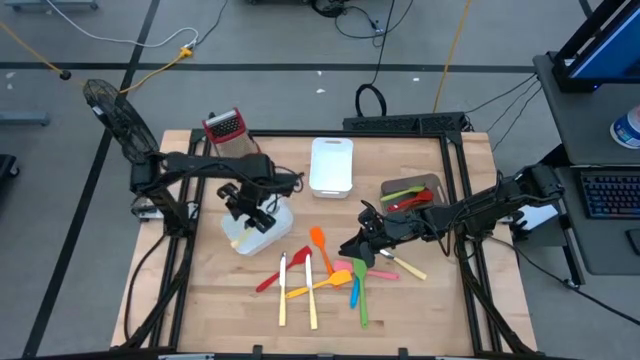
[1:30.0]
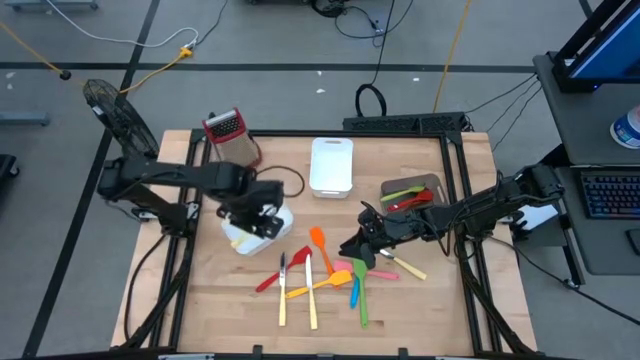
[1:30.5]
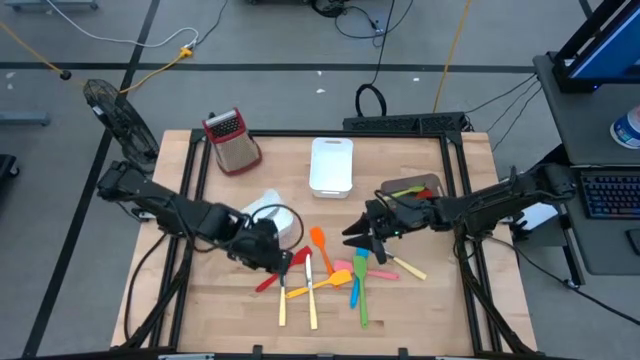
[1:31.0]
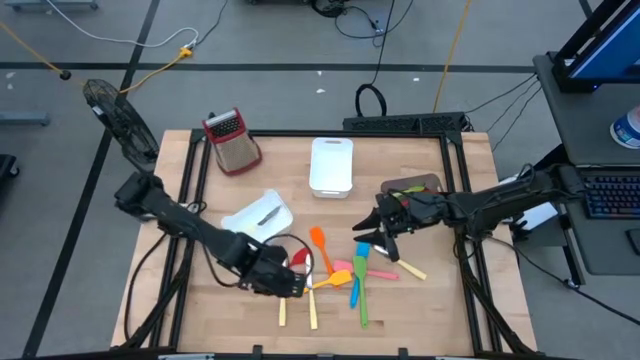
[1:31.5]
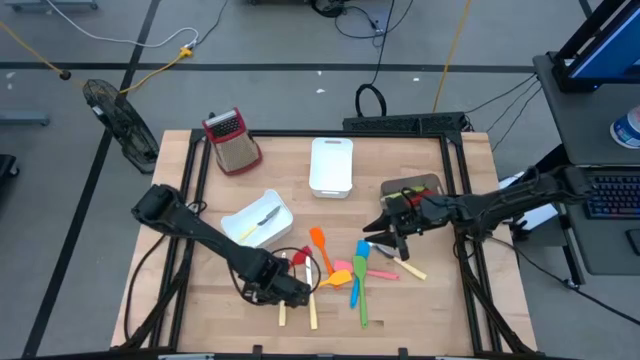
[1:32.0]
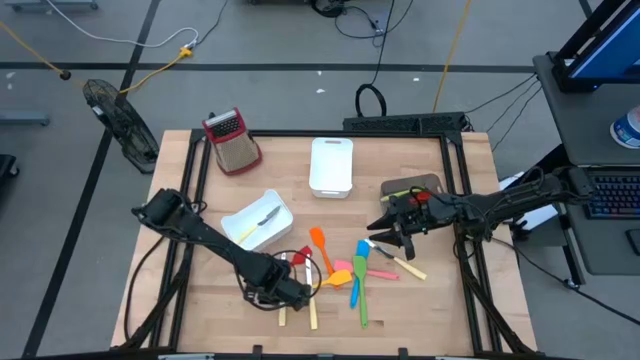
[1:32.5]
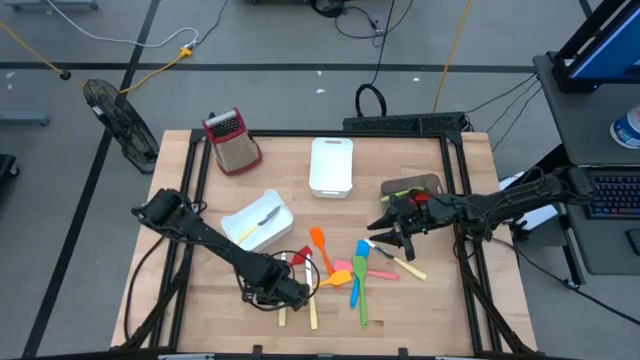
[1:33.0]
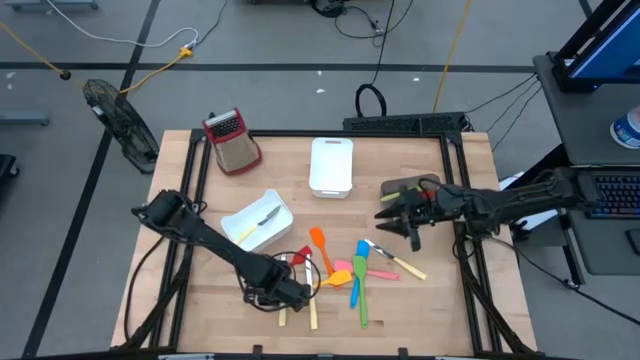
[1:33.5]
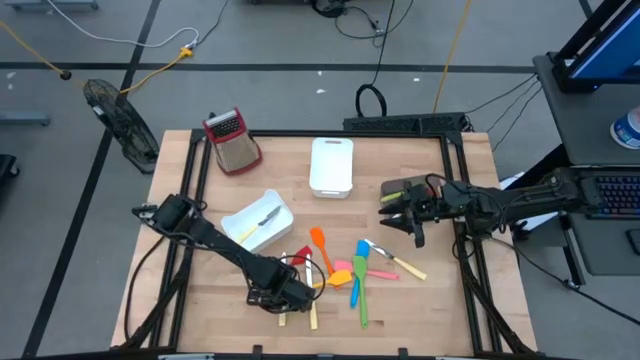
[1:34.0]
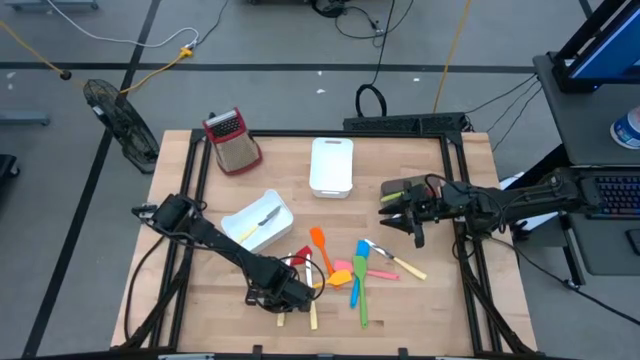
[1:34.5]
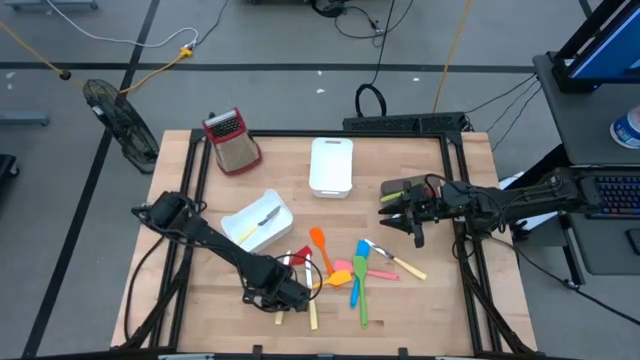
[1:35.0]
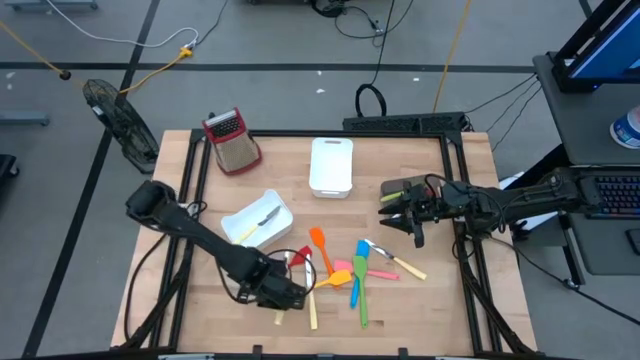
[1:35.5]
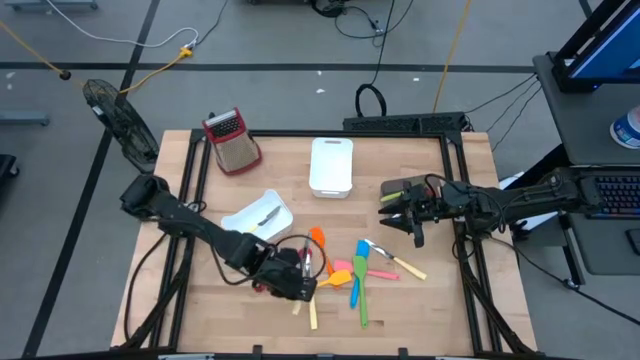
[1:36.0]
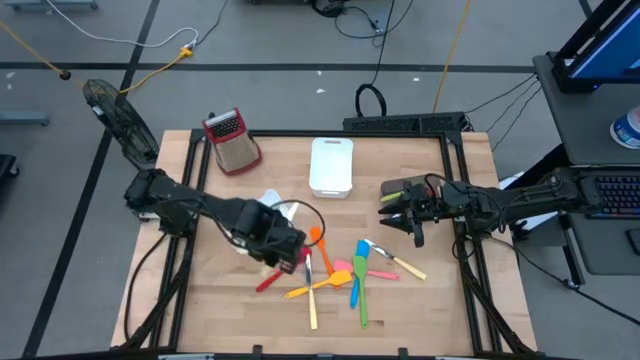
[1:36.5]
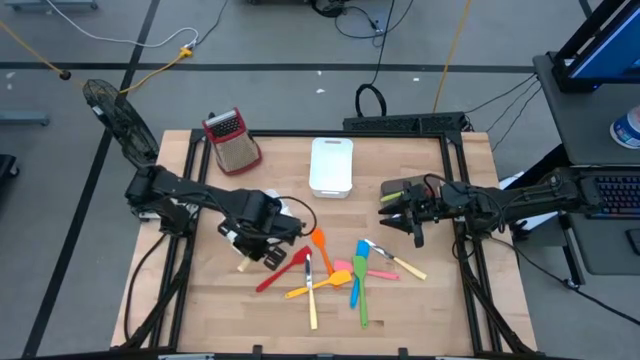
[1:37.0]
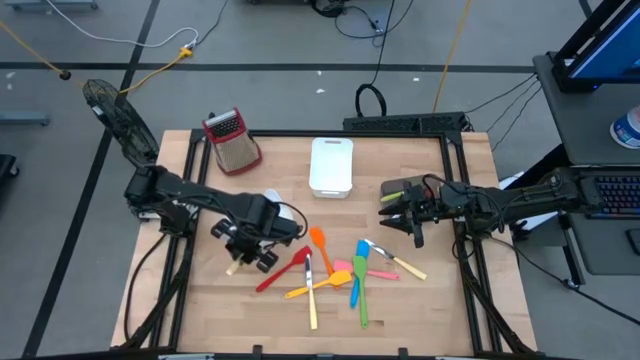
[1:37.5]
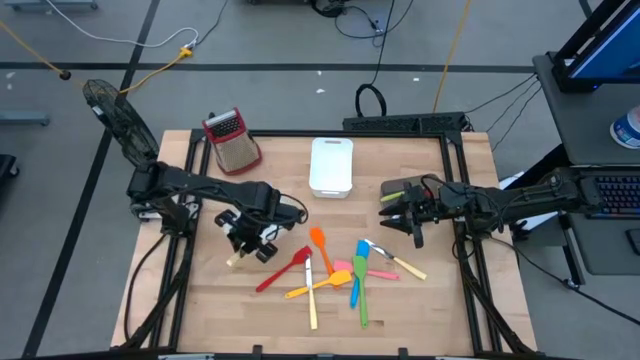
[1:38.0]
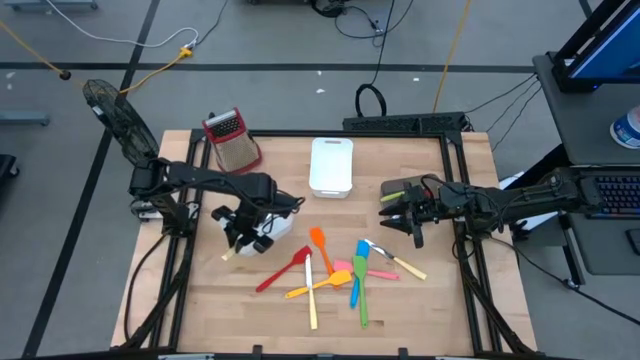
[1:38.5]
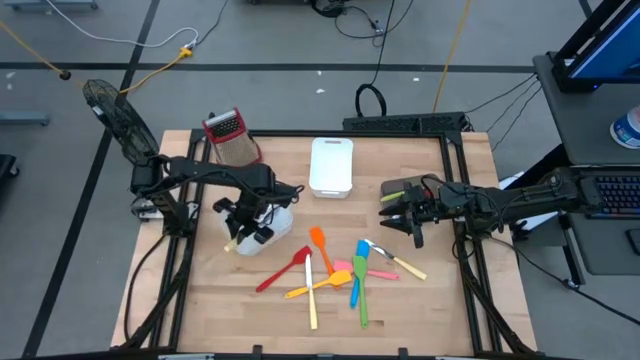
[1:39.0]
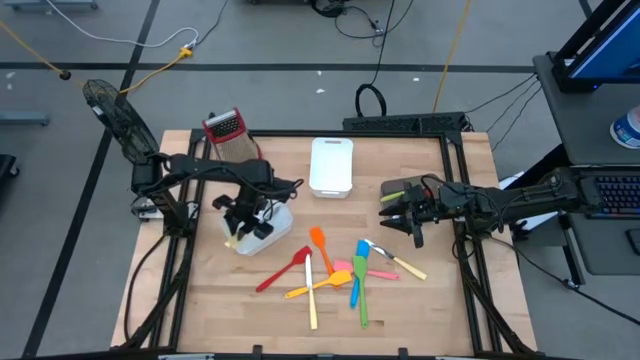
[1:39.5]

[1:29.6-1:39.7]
Task: Pick & Place Kitchen Items
Put the white table knife into the bottom white bin

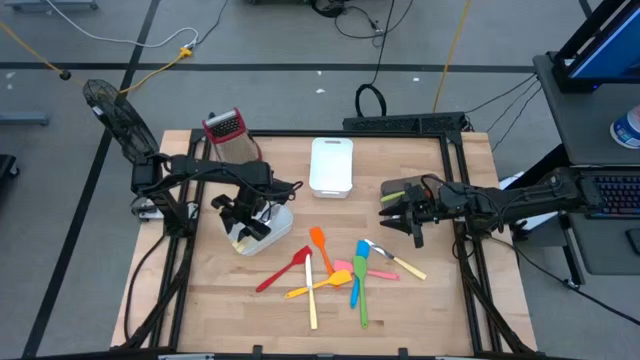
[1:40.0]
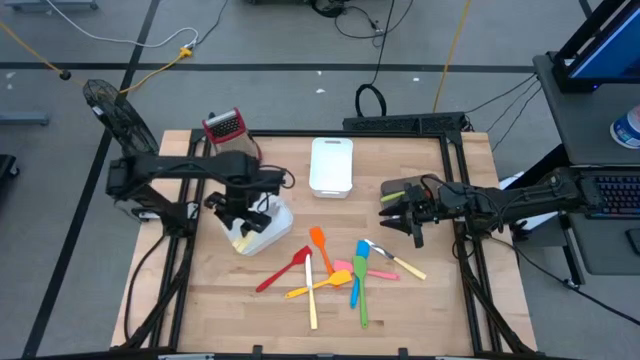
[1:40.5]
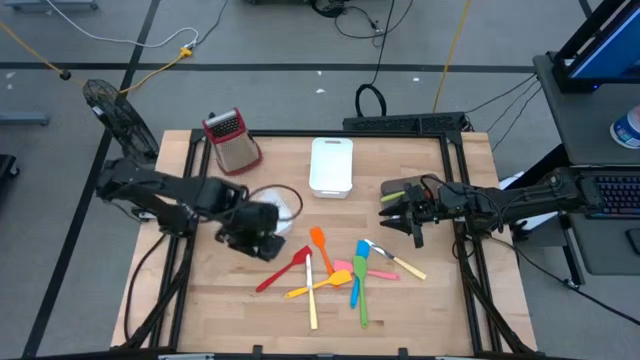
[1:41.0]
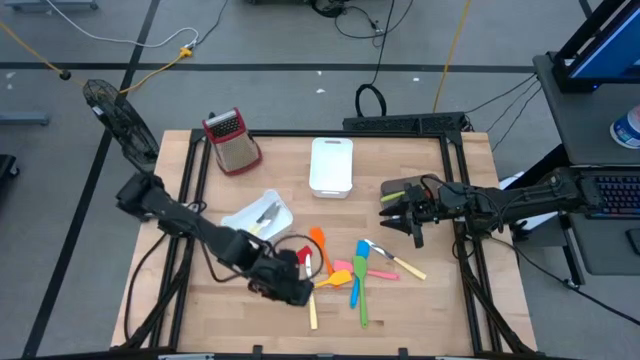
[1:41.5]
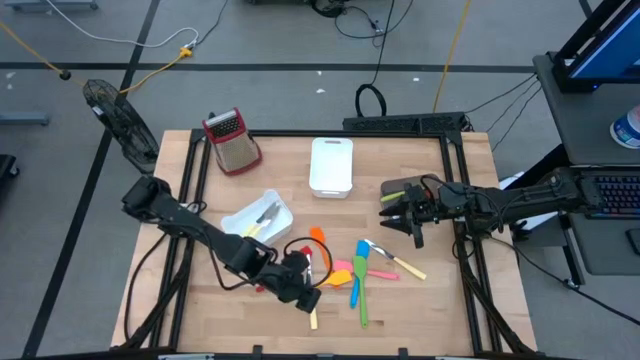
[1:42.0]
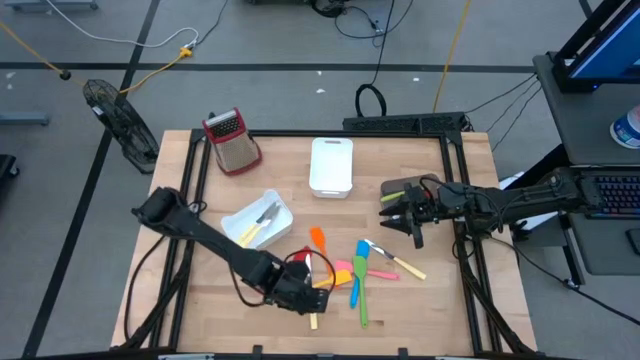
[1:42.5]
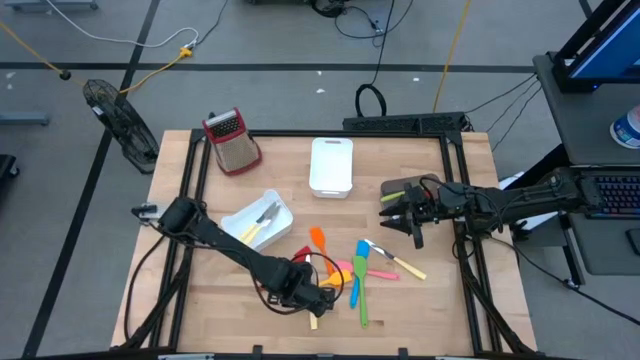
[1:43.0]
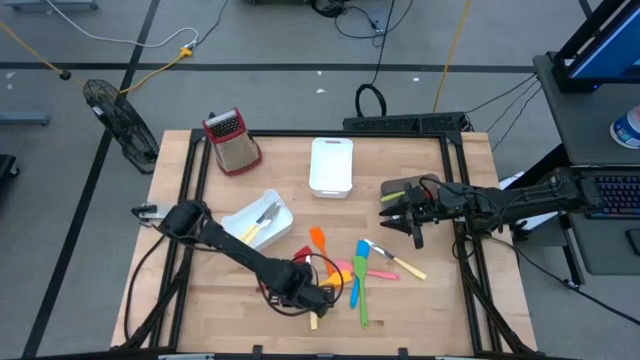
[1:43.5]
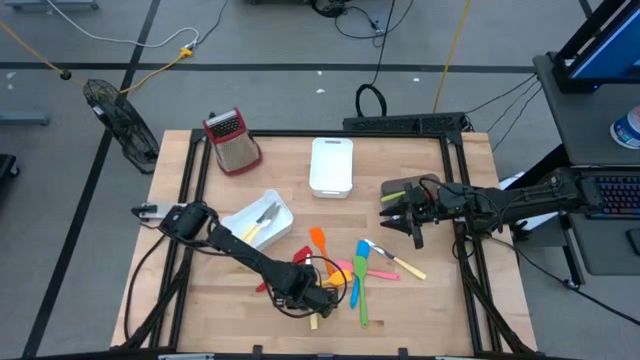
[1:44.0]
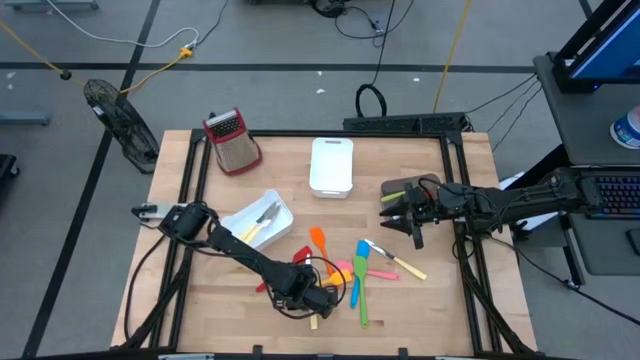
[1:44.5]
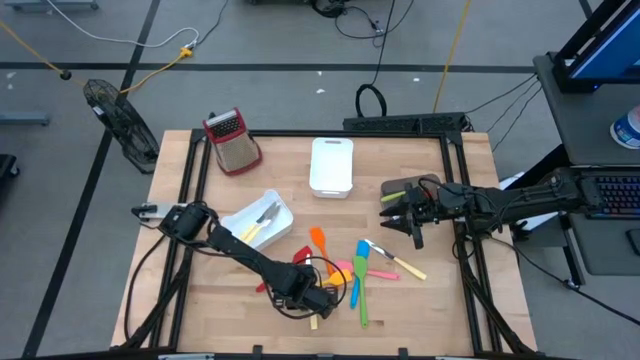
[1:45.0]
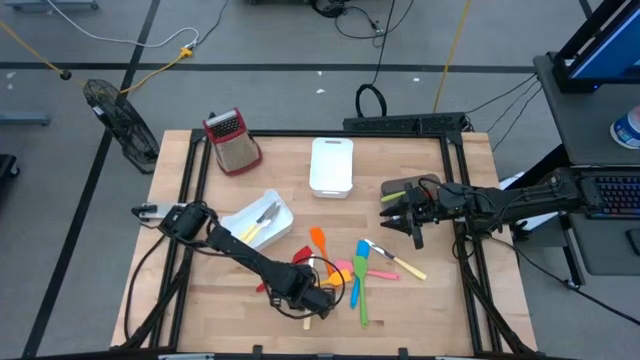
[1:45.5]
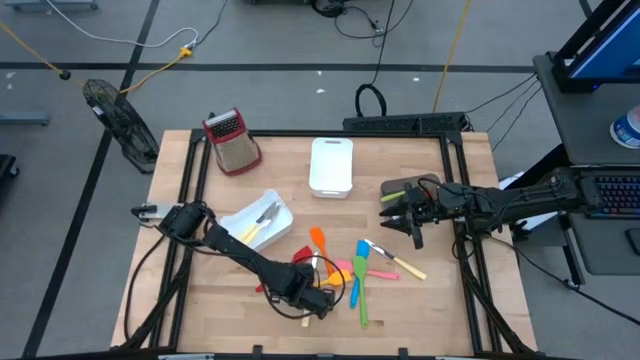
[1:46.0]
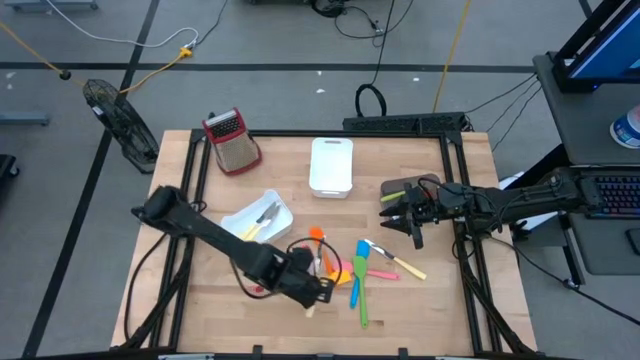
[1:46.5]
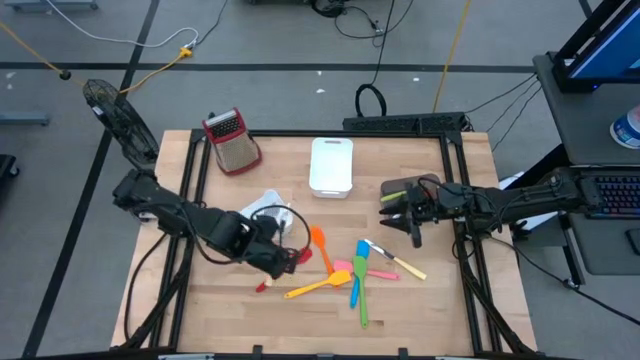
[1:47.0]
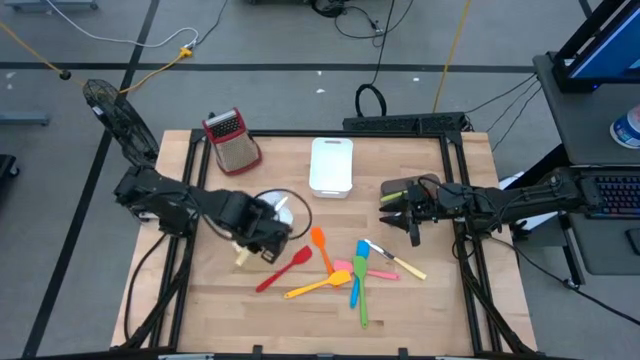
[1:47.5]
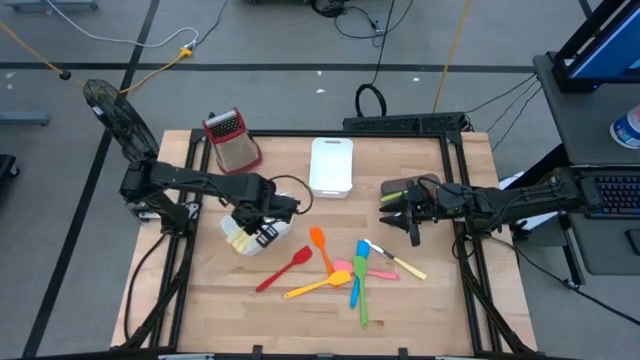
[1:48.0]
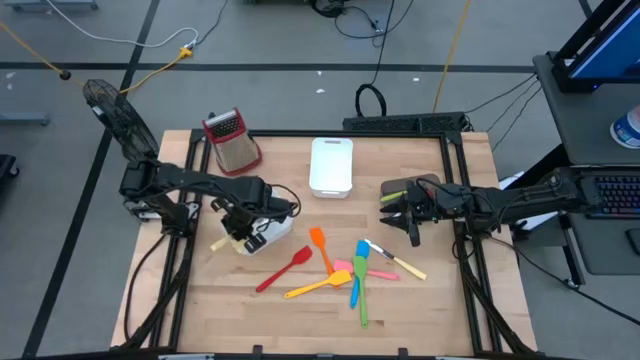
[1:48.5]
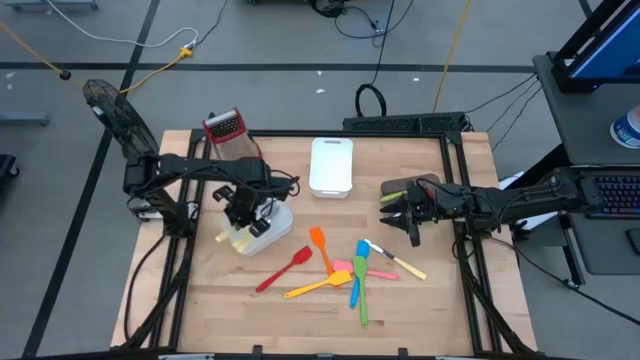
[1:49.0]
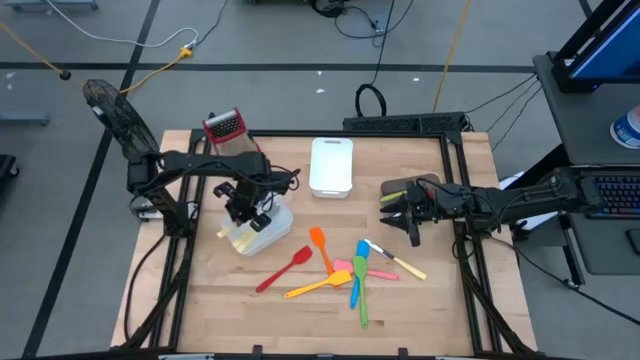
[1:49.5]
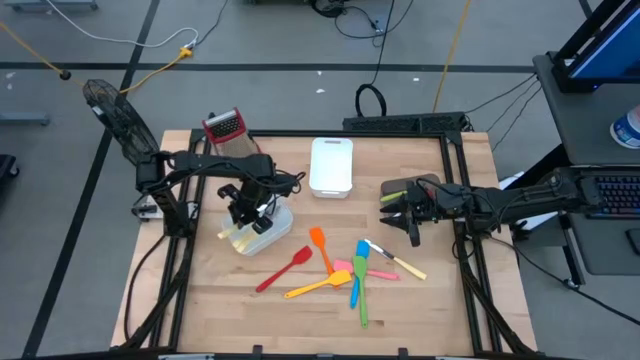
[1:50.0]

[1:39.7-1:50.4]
Put the white table knife into the bottom white bin

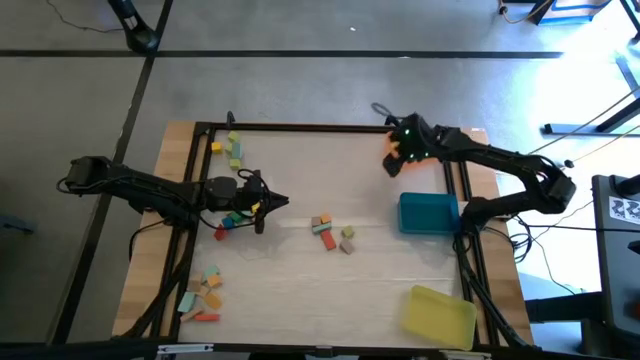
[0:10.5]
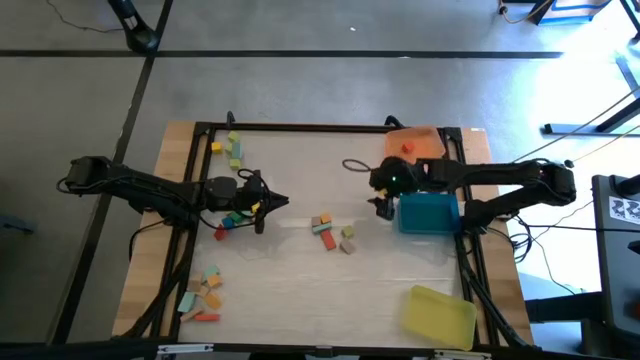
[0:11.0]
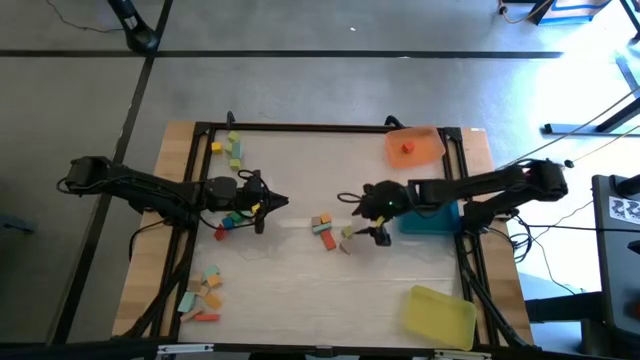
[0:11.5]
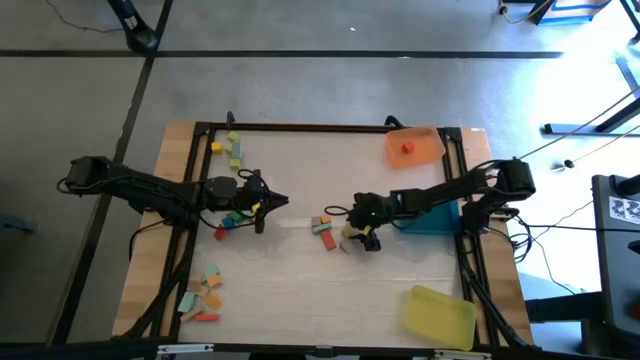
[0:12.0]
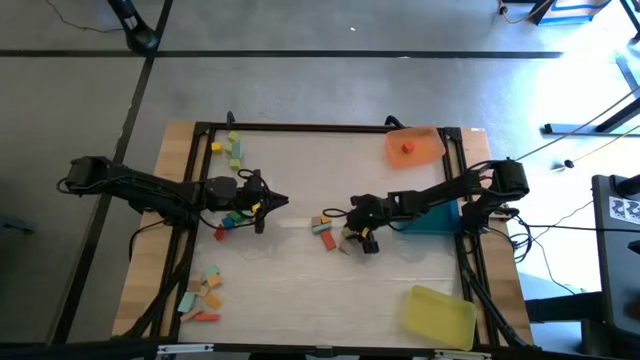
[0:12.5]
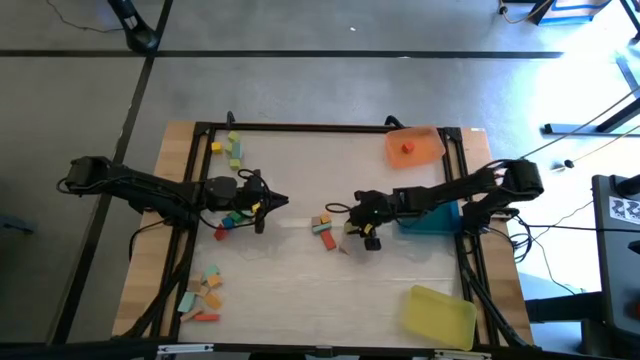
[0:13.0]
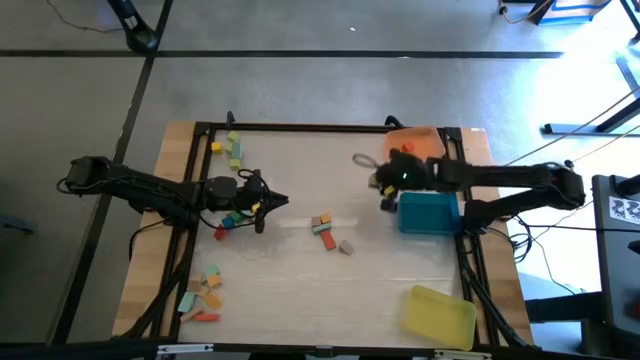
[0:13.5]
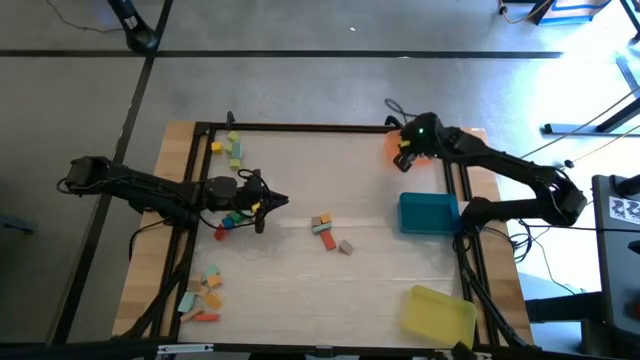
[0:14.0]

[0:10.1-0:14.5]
Task: Sort blocks by size
Put the green cube block into the orange bin
